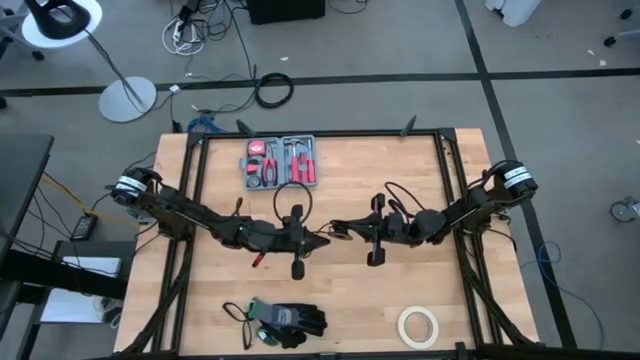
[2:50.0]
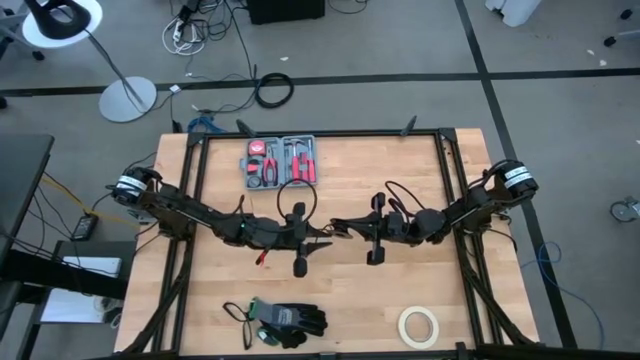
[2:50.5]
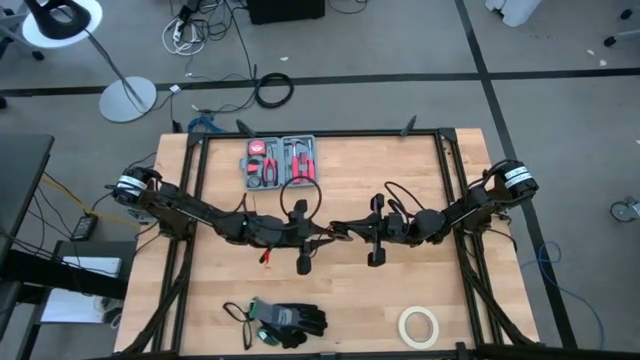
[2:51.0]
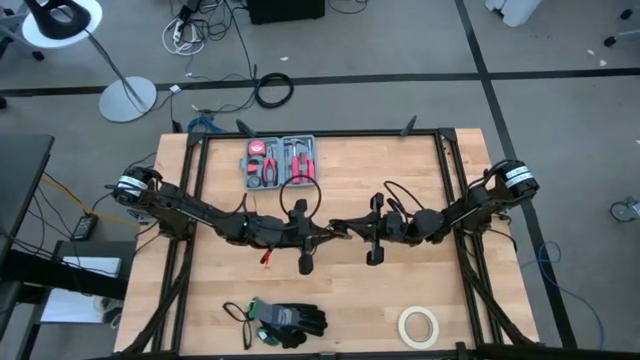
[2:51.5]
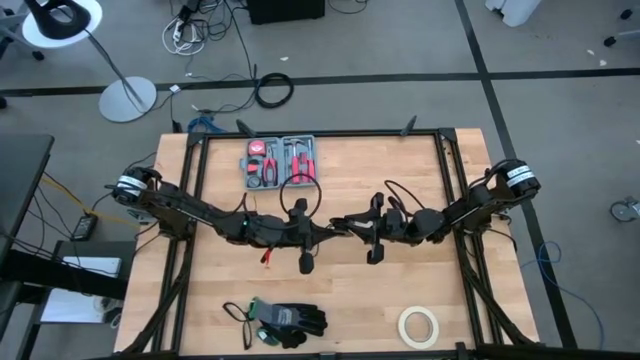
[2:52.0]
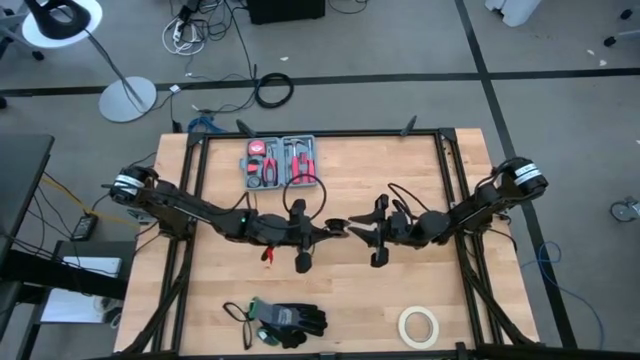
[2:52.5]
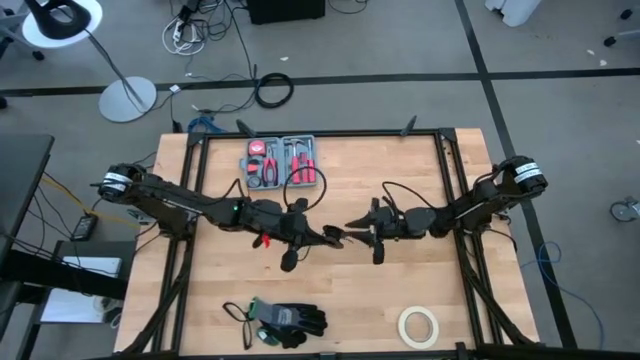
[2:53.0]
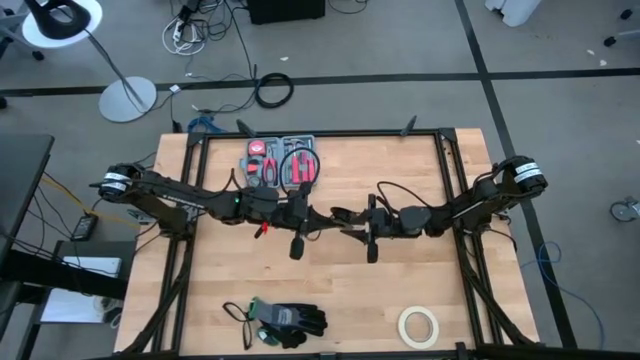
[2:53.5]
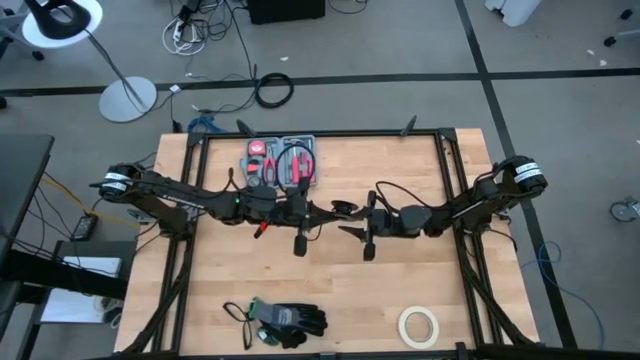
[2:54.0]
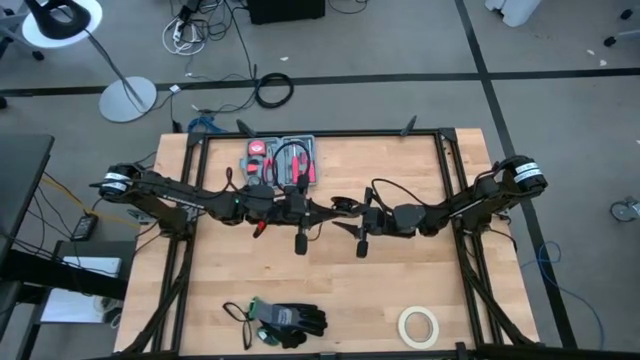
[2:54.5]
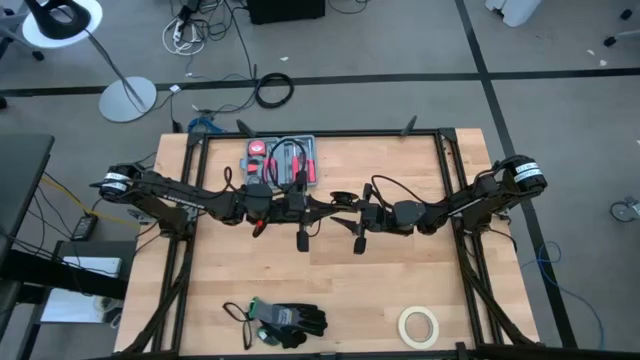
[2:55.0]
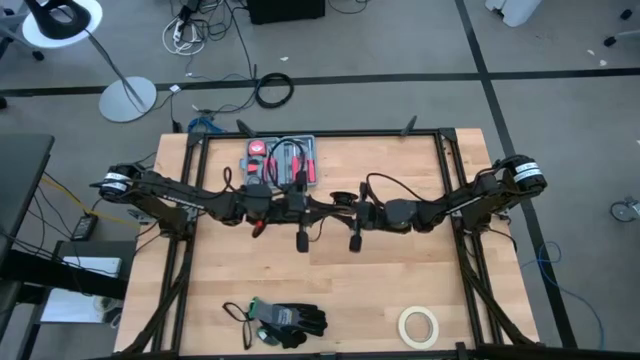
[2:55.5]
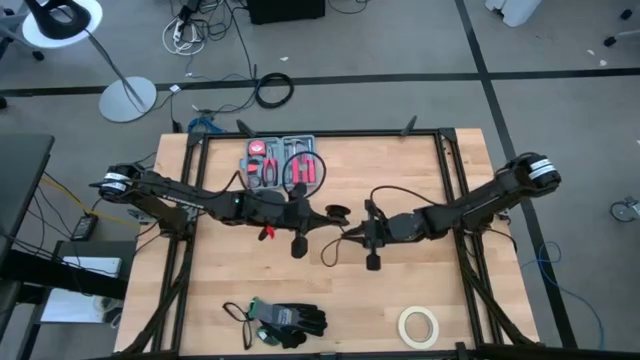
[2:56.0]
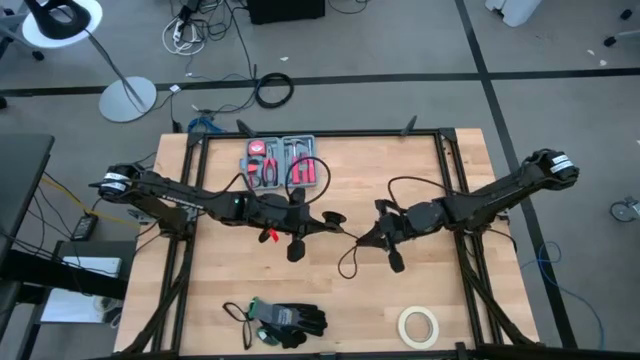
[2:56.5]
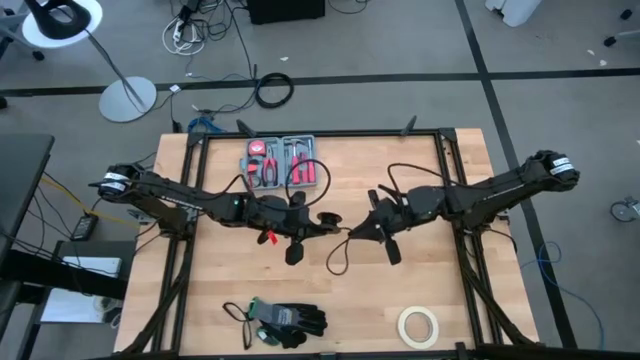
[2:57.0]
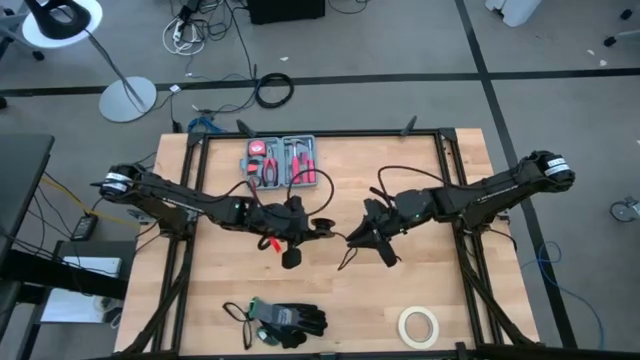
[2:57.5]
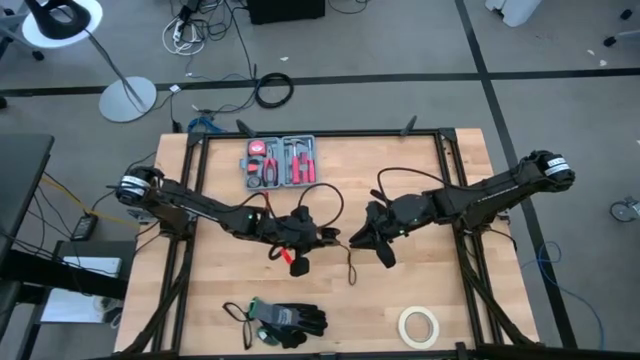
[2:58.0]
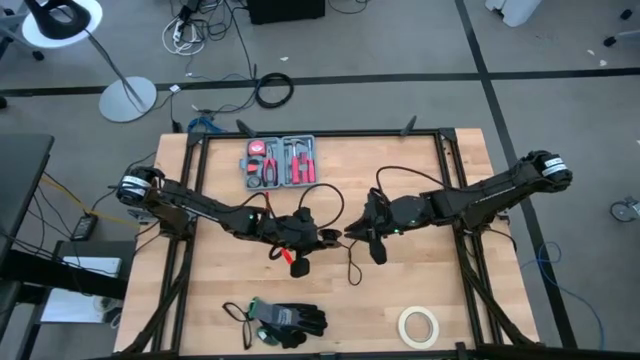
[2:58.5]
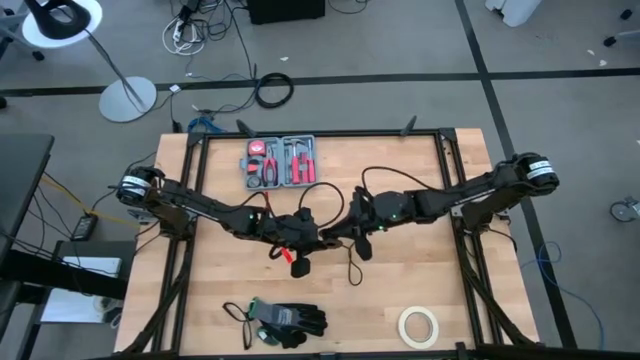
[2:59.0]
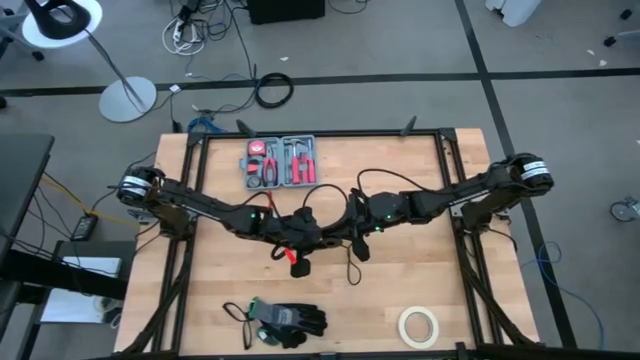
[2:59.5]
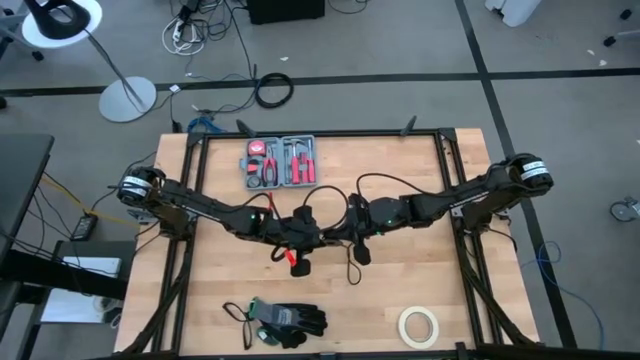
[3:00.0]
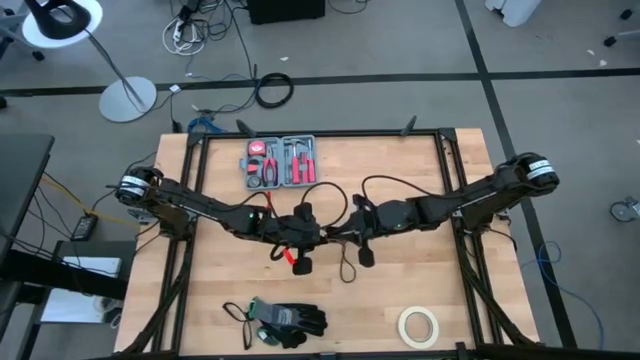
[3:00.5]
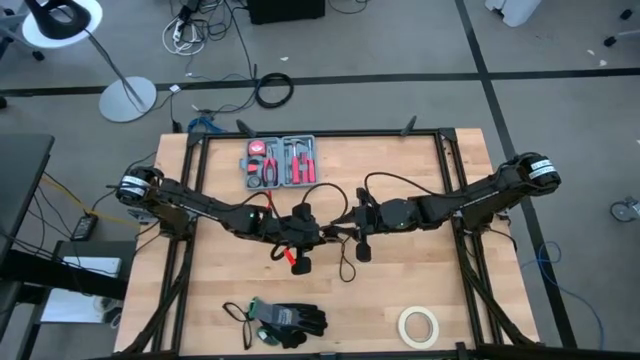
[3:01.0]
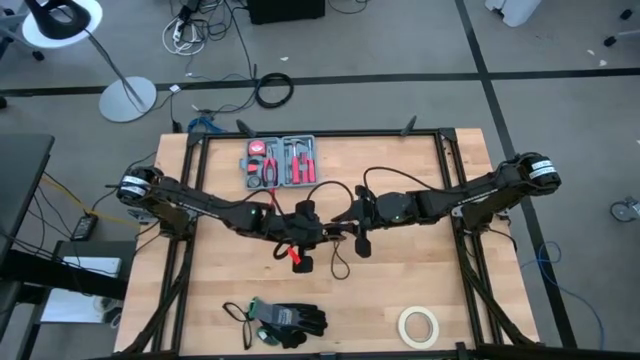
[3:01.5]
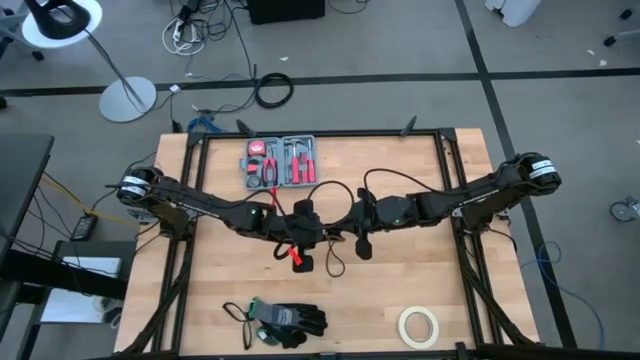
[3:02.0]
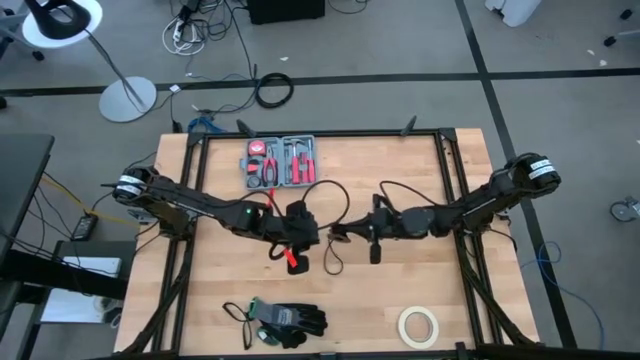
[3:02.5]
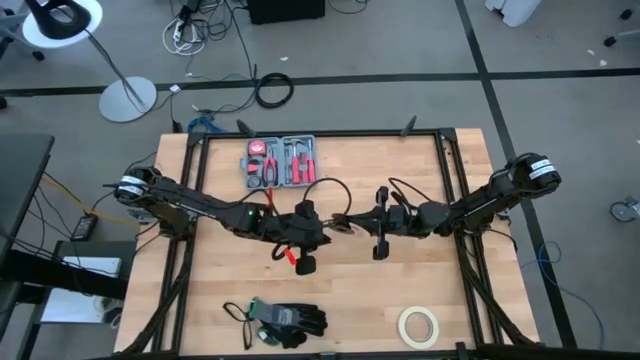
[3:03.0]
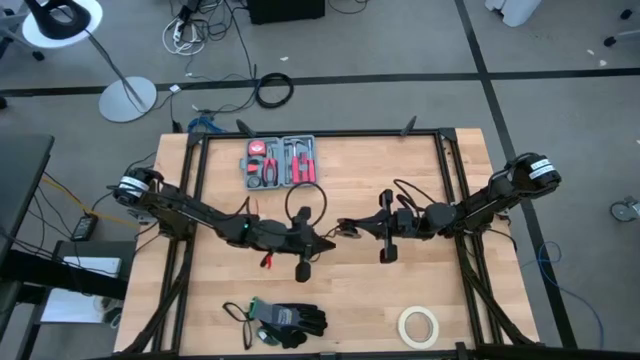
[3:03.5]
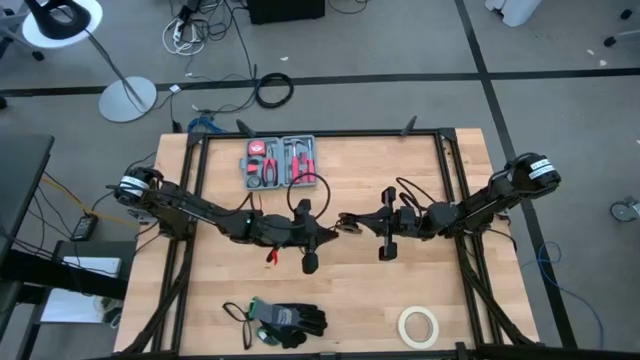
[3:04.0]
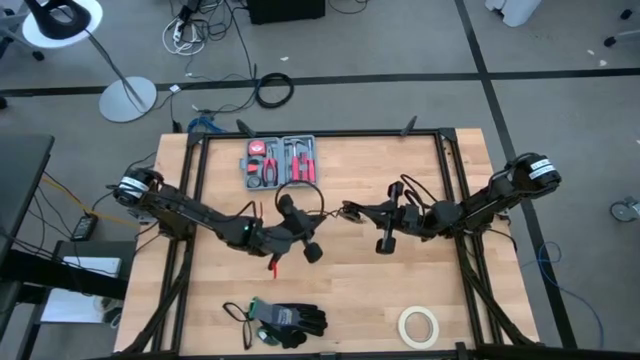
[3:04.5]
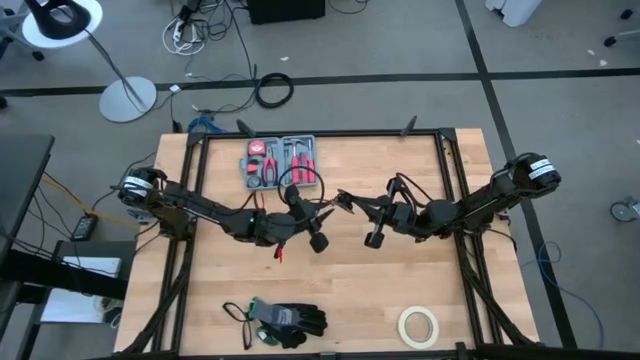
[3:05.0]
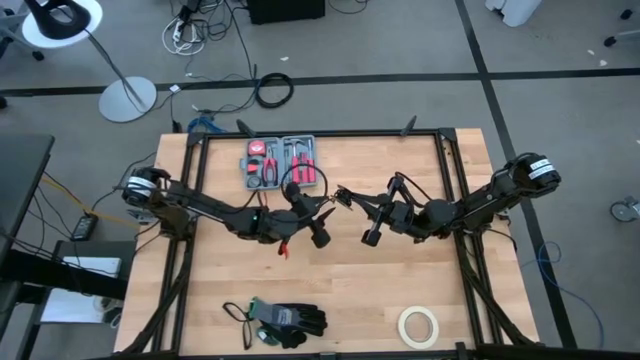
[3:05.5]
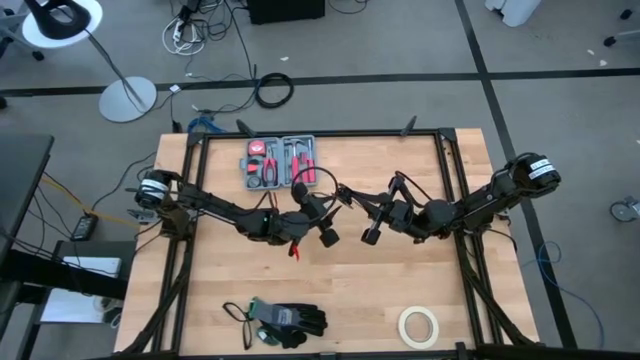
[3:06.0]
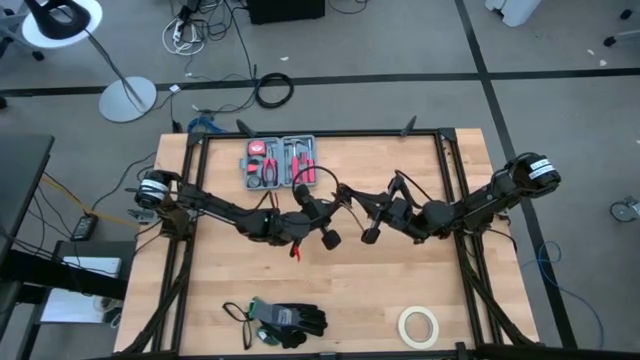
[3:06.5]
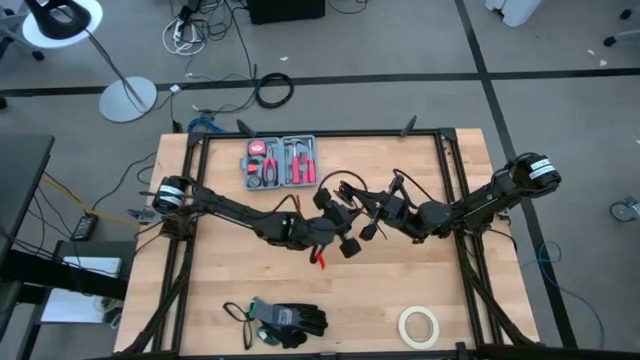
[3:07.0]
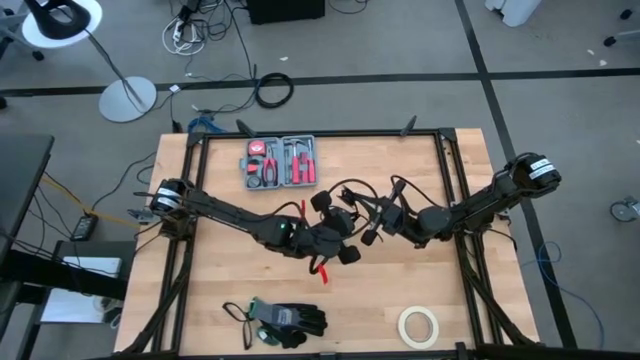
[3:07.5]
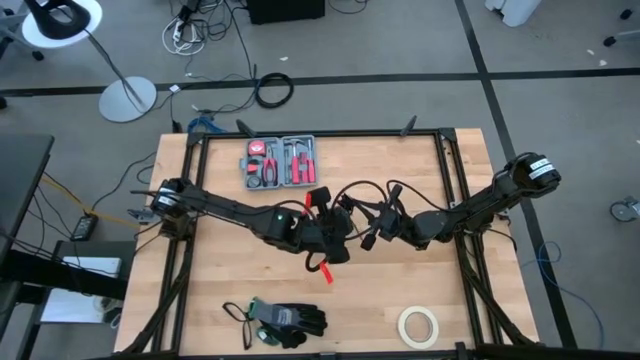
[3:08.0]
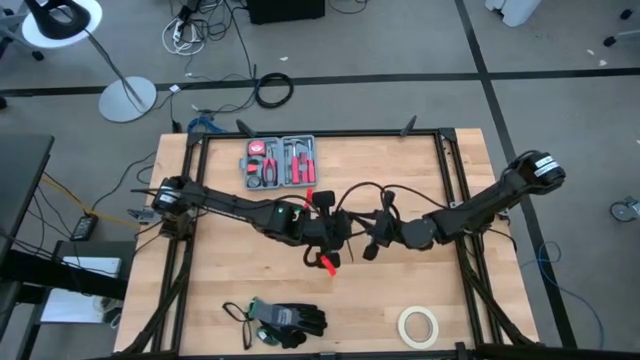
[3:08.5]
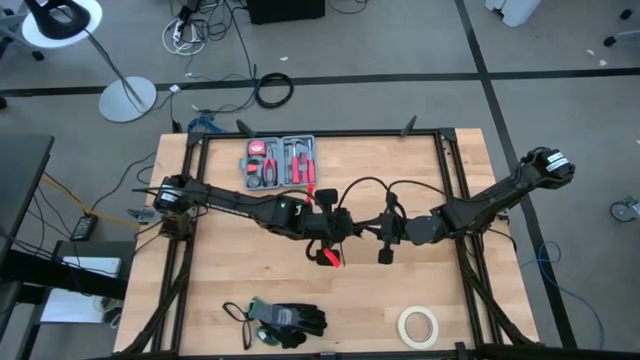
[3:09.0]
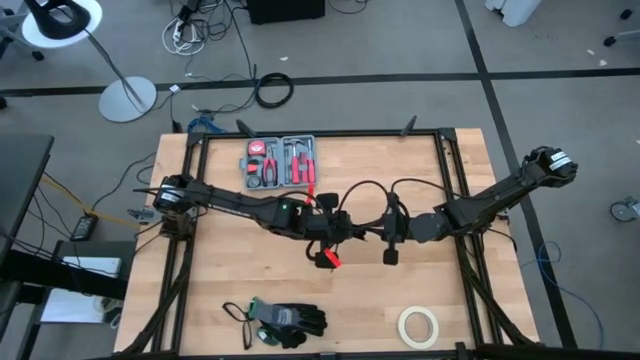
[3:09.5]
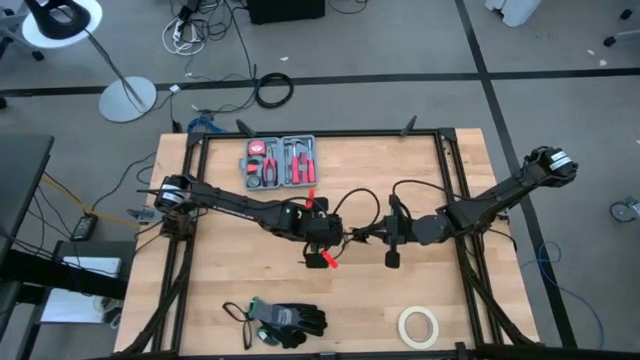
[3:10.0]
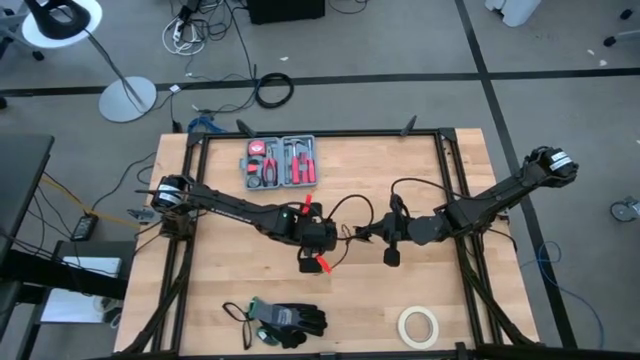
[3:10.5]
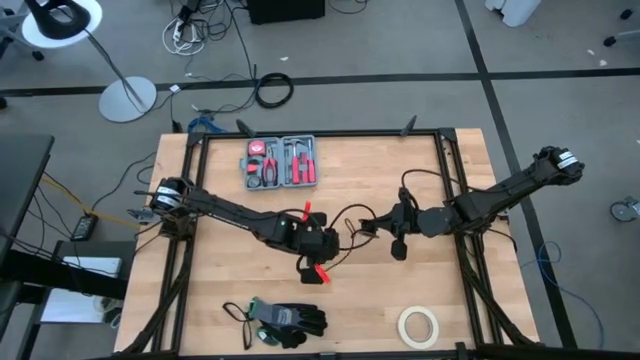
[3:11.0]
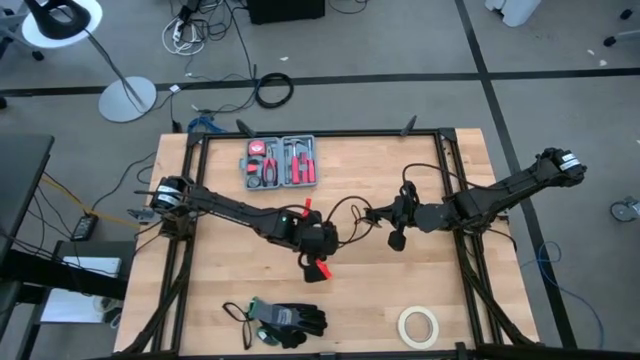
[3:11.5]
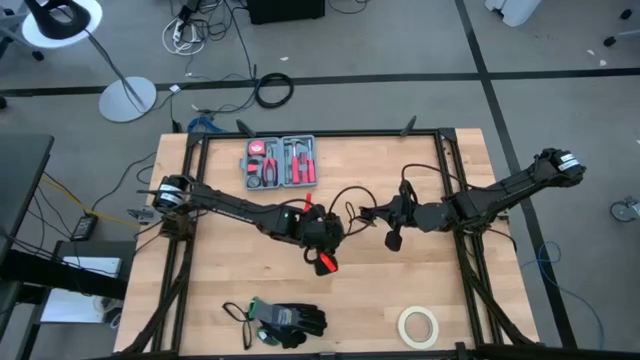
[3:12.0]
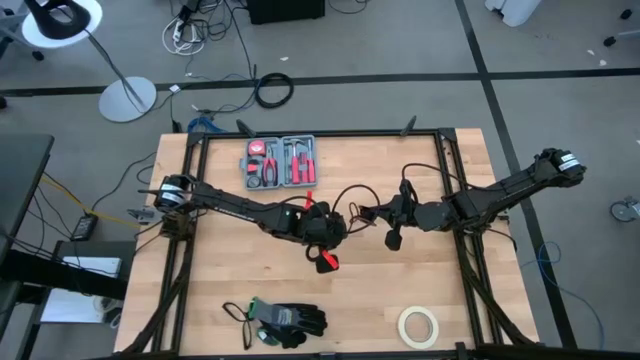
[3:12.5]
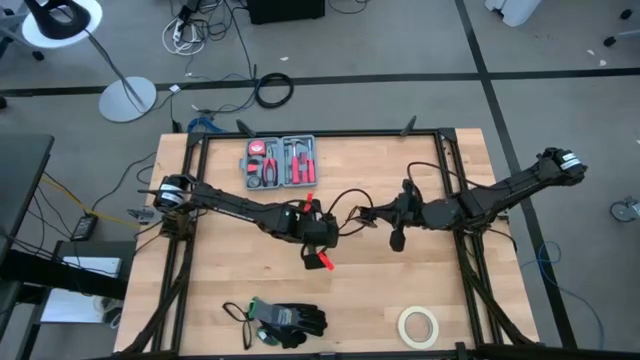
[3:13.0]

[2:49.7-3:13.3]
Task: Coil cords
Coil the black wire cable into the black spool
